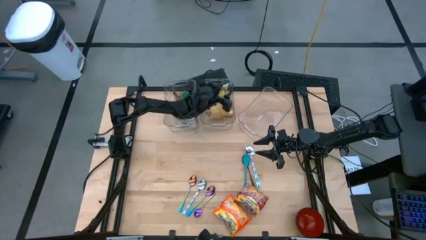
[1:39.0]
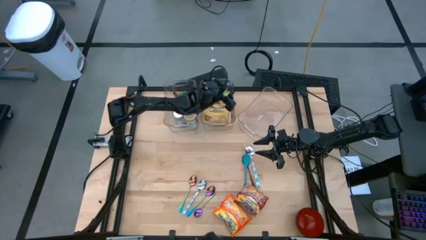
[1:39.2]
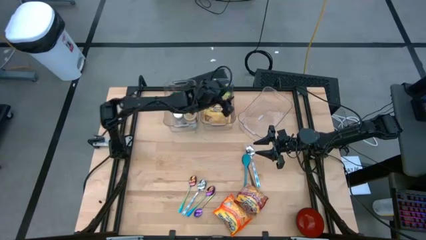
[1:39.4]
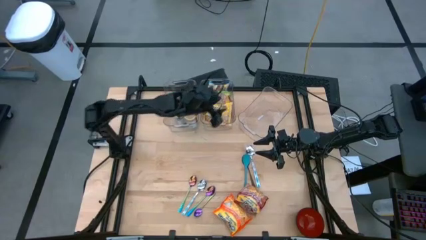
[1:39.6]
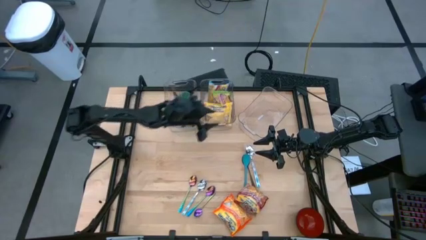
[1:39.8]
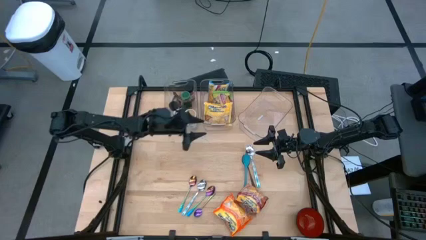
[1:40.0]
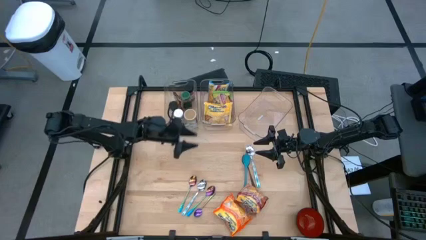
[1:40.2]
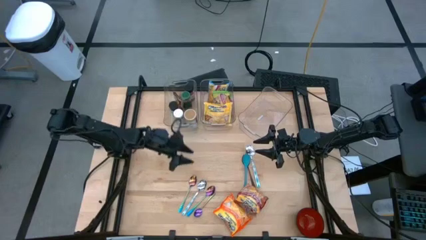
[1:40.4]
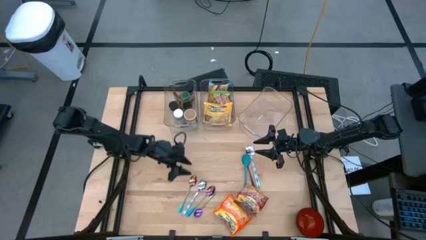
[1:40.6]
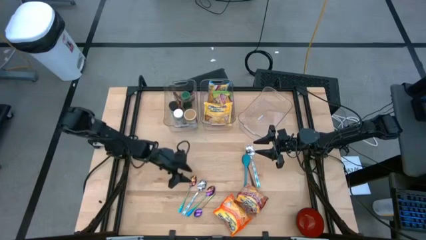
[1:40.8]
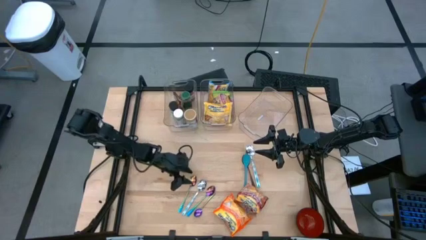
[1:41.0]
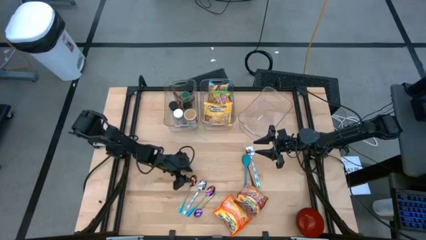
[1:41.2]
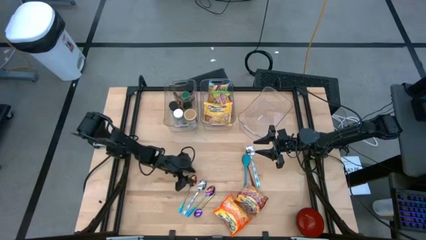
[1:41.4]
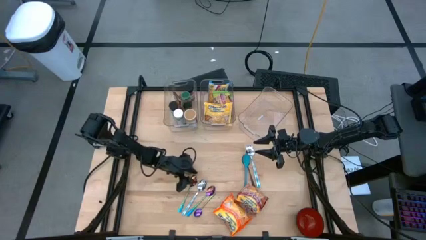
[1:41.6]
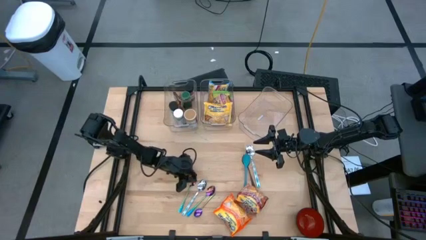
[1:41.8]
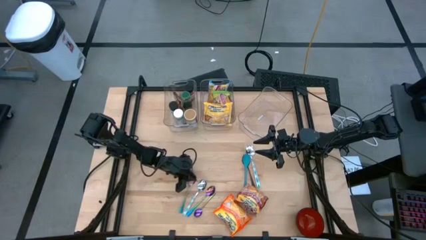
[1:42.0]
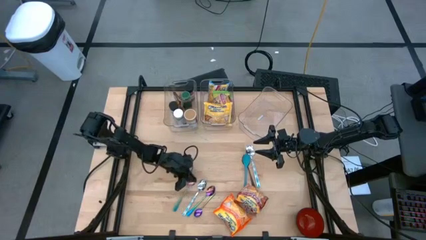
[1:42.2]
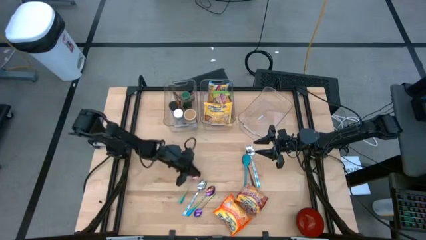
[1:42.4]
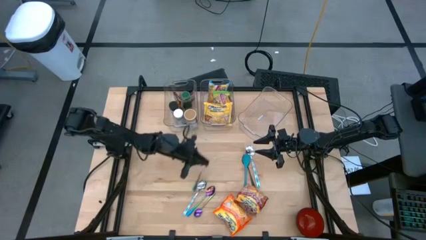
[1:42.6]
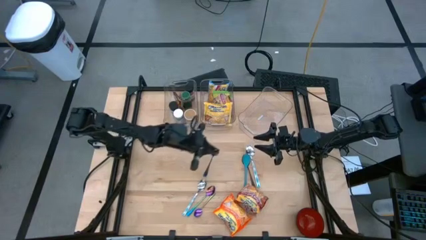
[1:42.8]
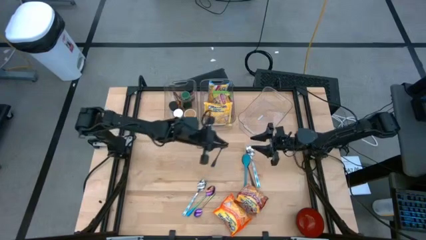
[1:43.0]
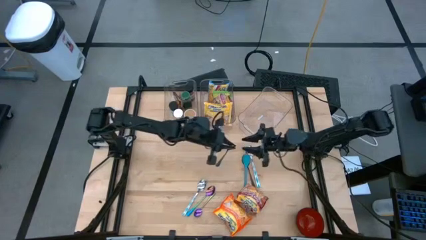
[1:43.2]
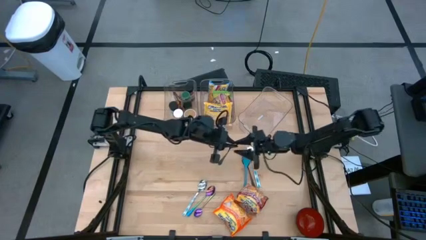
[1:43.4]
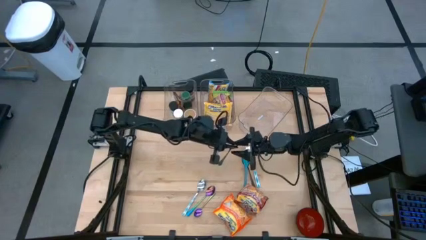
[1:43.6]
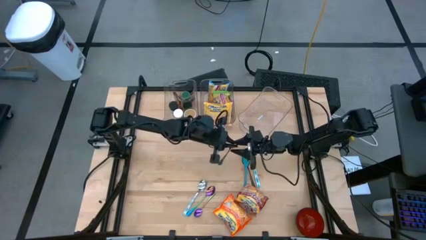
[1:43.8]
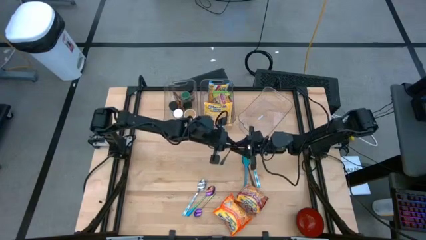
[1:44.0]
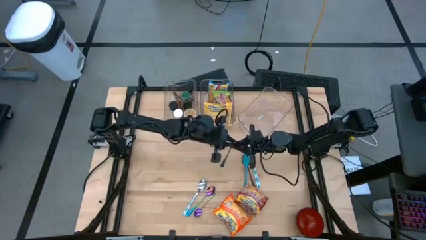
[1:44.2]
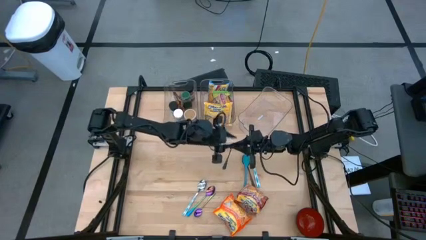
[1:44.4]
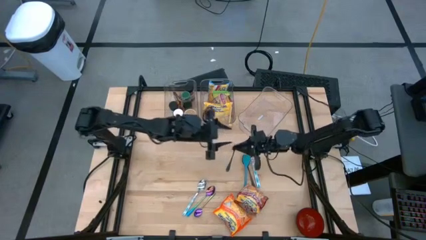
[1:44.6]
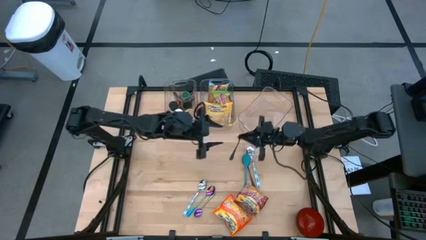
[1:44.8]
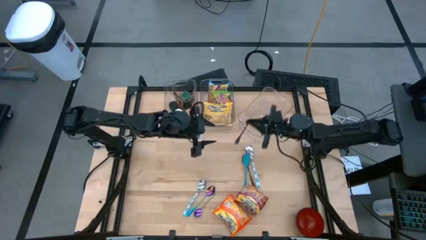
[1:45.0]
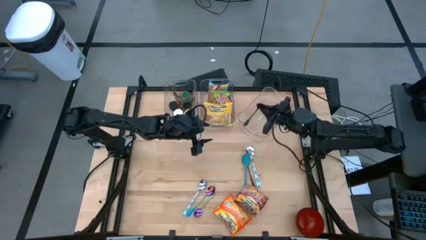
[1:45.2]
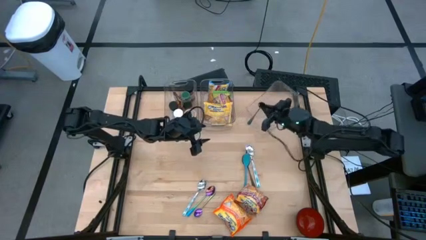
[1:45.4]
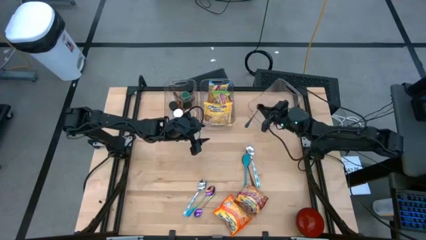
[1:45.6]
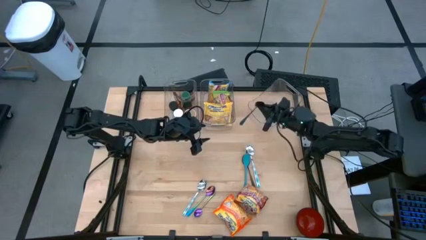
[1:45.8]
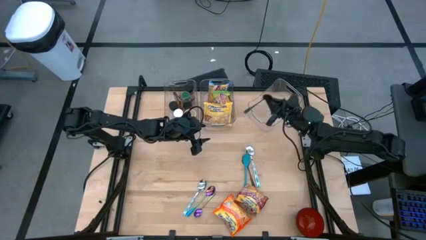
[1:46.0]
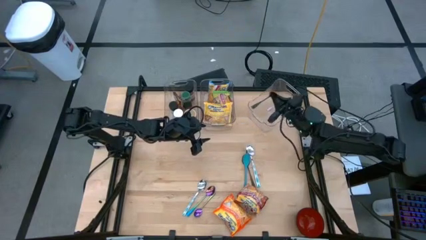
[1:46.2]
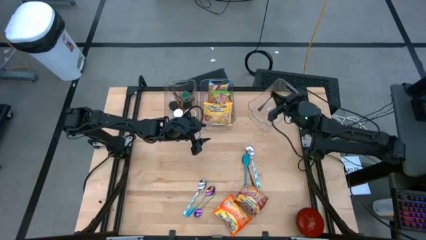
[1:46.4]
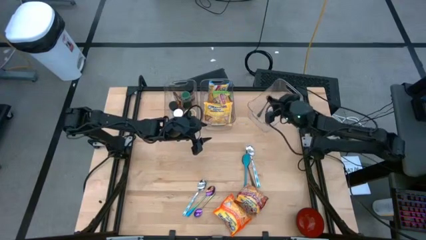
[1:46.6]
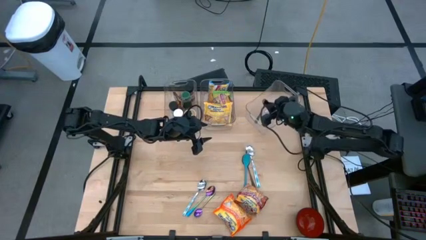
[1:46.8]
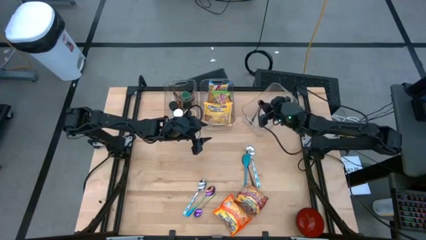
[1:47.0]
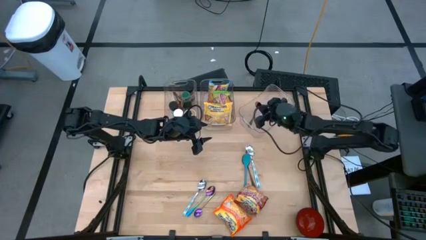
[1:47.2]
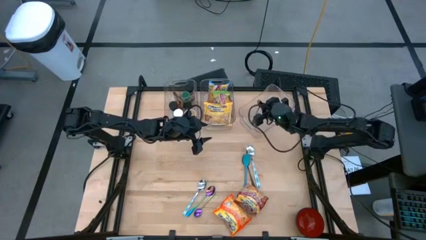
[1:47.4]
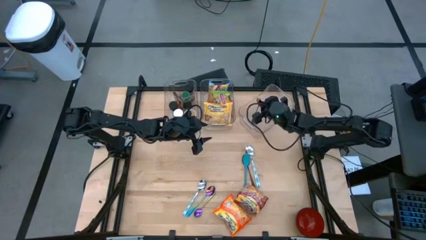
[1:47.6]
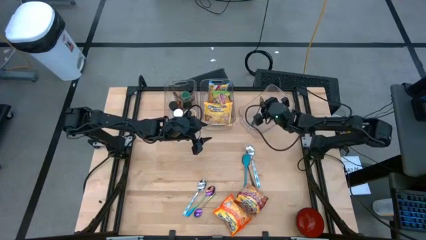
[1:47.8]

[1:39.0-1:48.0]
Task: Pick & Place Food Item
Put the right blue spoon into the right transparent bin

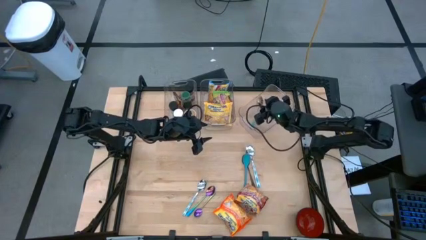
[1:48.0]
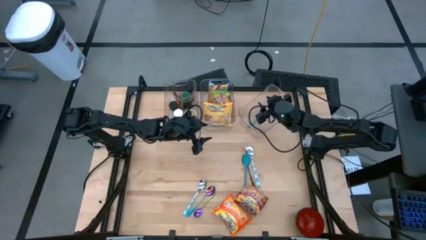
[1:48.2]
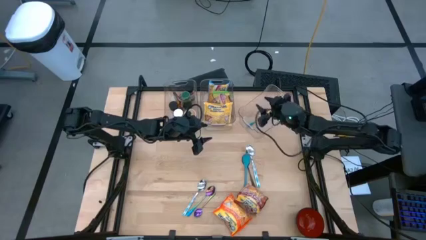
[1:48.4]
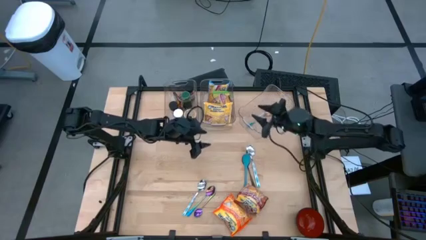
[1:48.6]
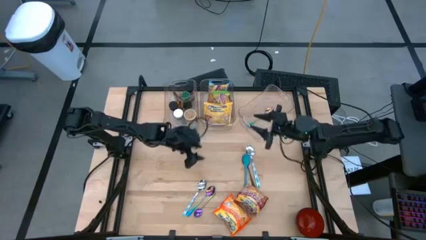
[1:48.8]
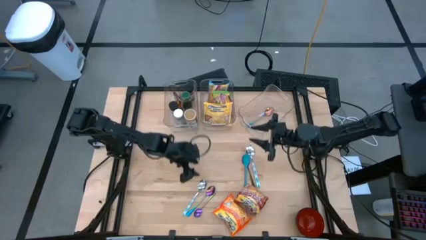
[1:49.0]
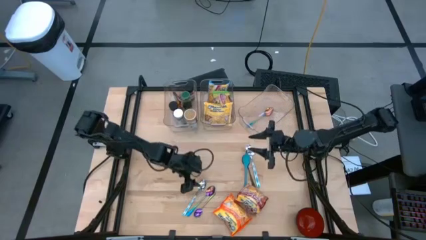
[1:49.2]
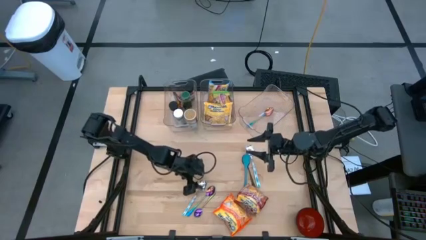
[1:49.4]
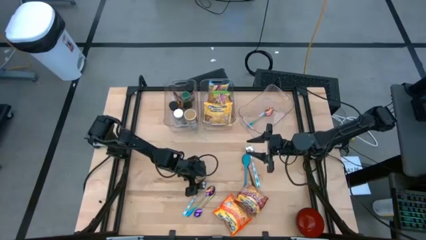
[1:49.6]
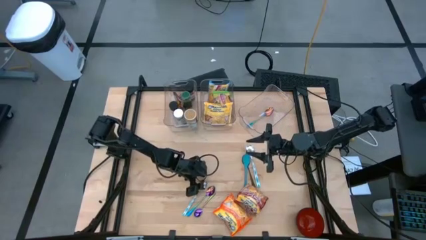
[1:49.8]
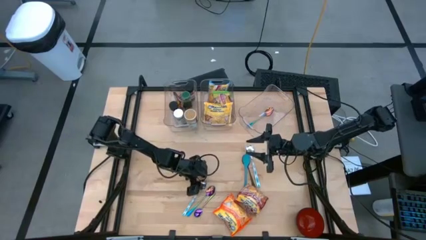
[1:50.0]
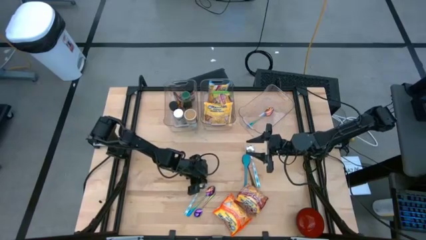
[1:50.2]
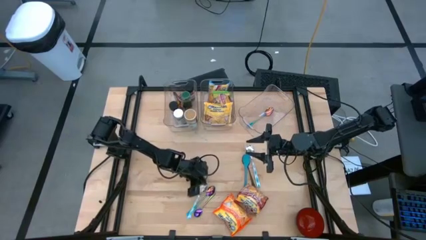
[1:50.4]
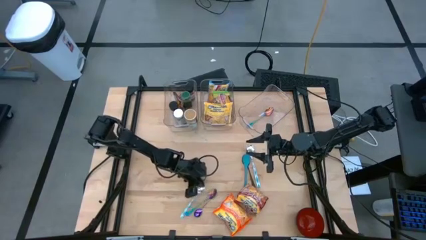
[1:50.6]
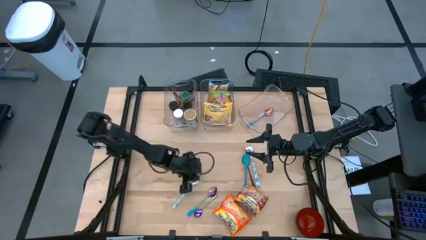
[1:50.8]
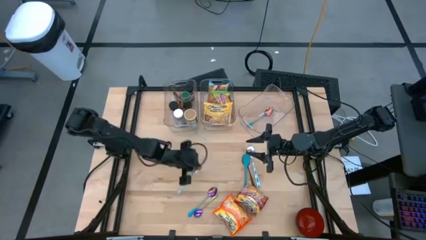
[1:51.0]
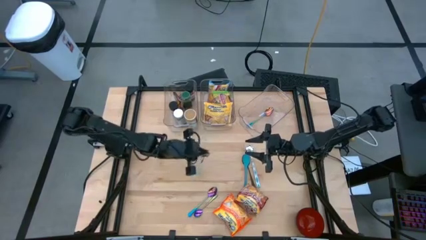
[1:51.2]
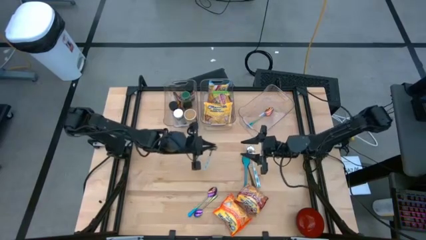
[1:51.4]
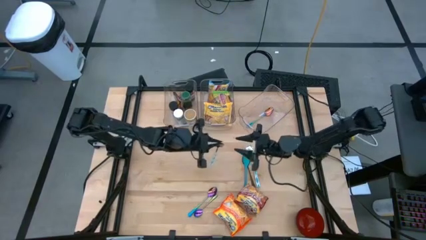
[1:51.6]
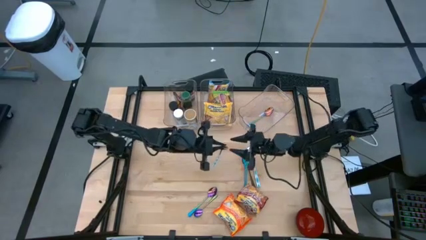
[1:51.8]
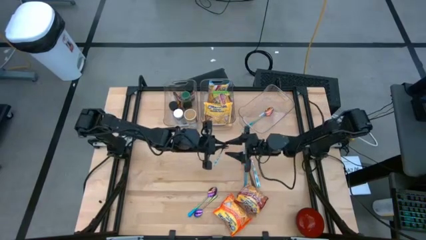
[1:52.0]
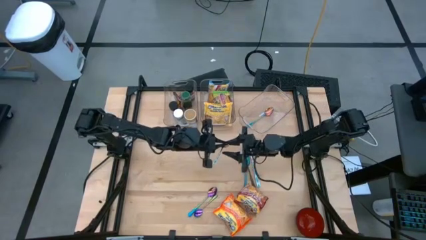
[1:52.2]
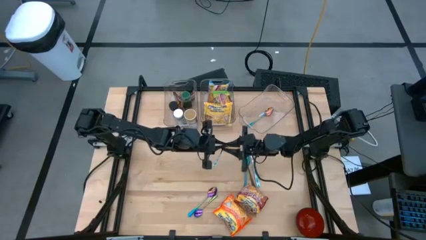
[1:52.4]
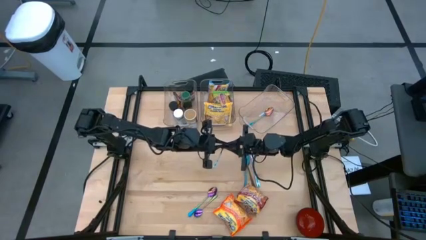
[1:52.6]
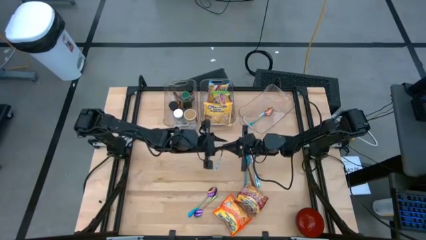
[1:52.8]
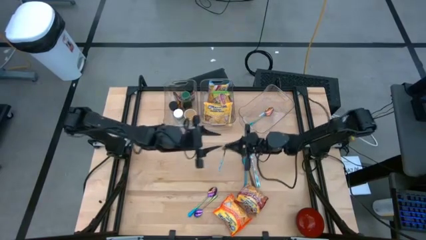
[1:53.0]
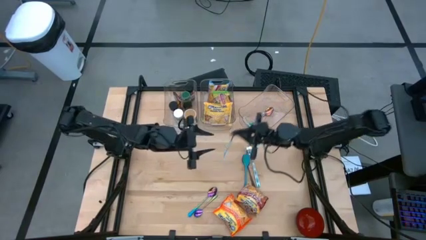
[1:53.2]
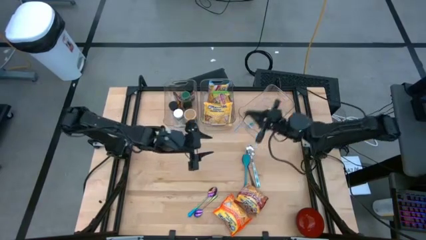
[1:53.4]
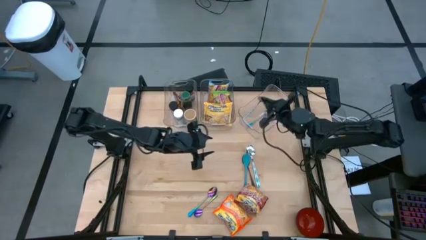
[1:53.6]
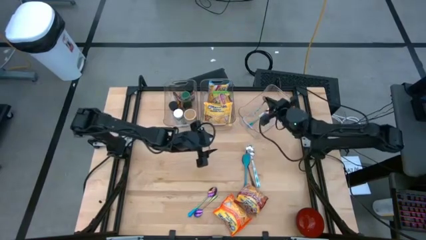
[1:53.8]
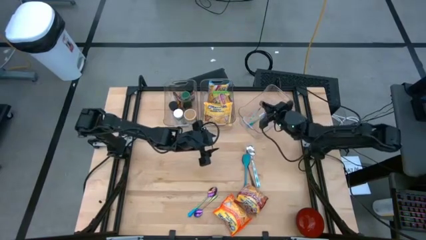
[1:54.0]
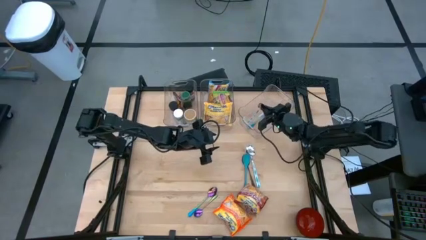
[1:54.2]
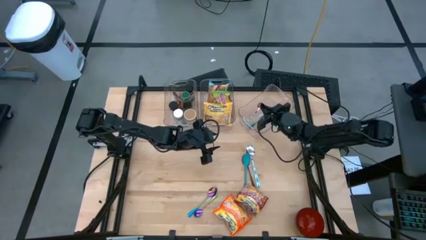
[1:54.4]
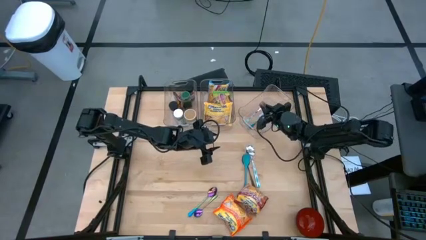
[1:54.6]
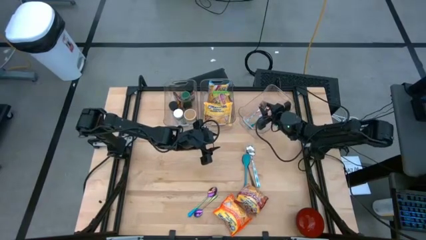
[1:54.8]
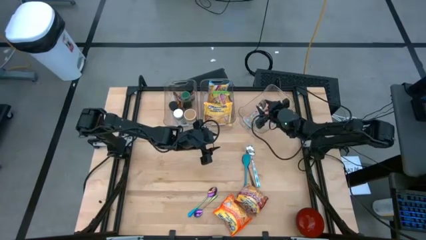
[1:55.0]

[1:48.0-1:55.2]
Put the bottom white patterned spoon into the right transparent bin
